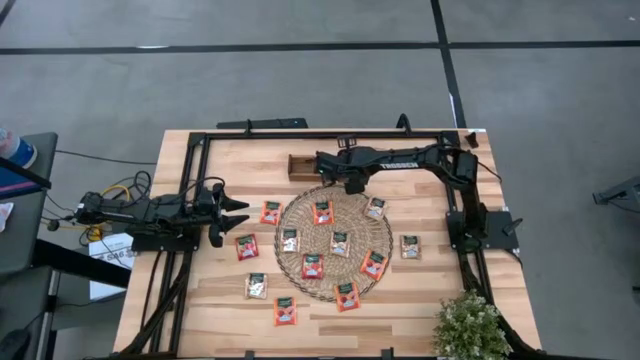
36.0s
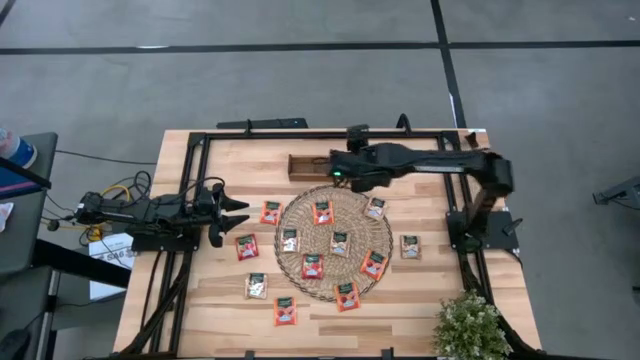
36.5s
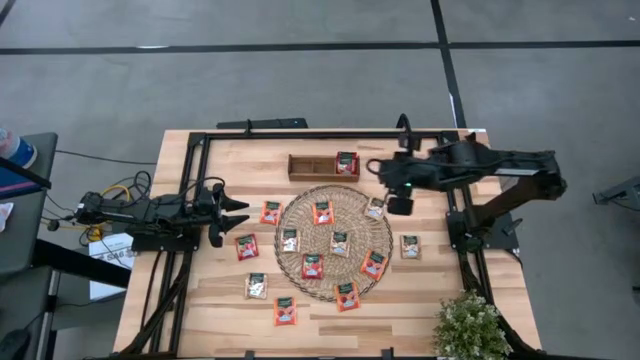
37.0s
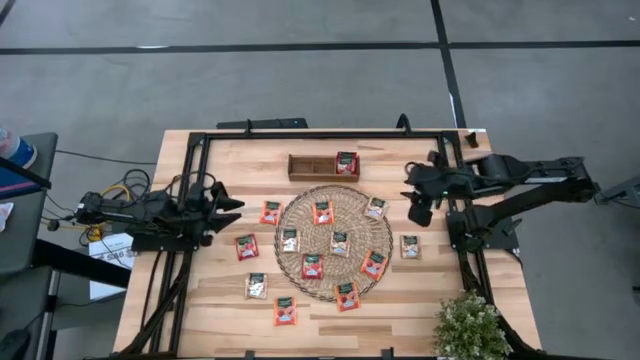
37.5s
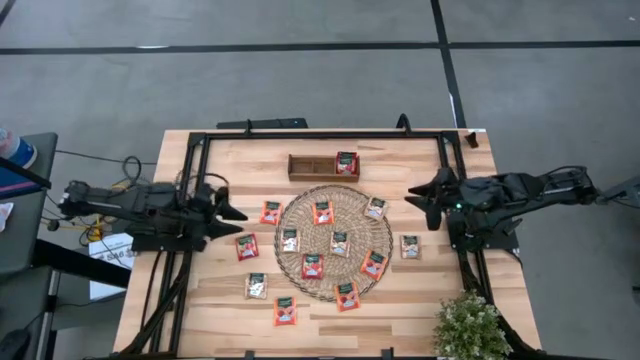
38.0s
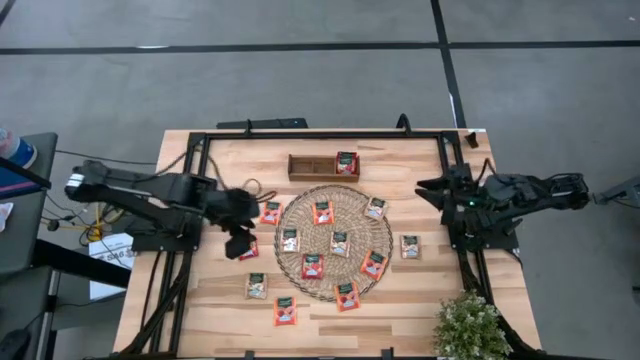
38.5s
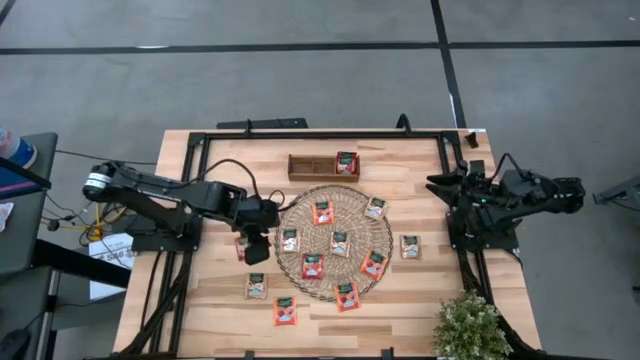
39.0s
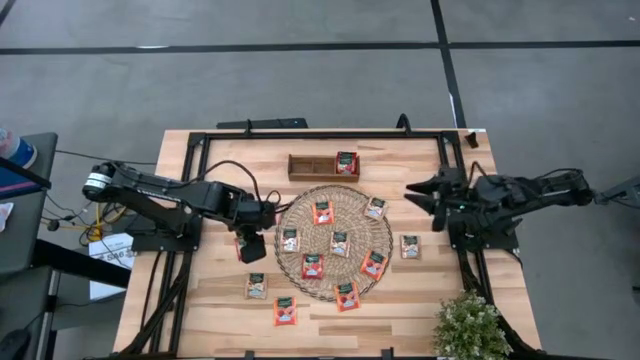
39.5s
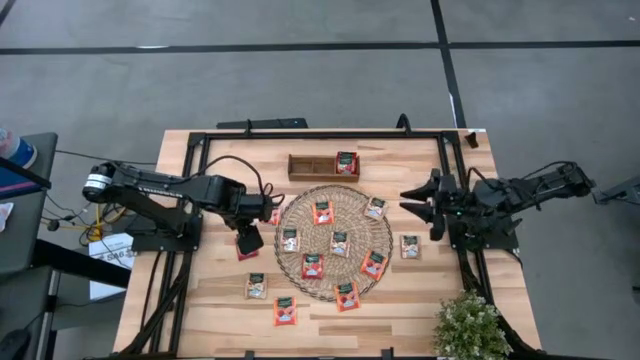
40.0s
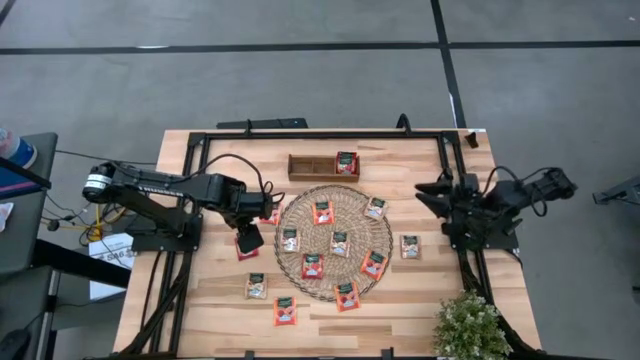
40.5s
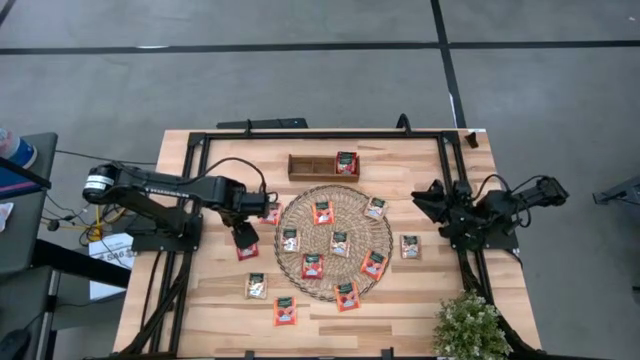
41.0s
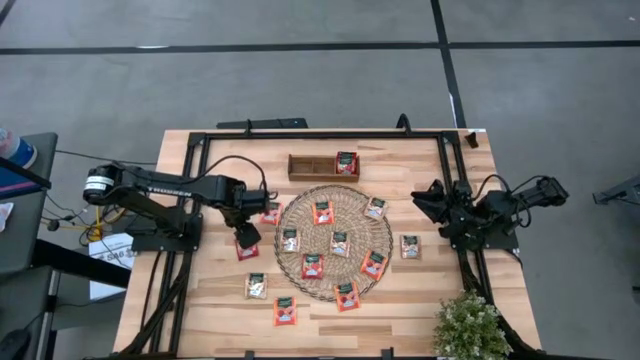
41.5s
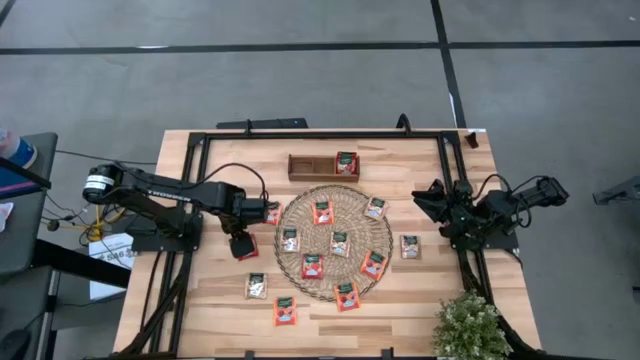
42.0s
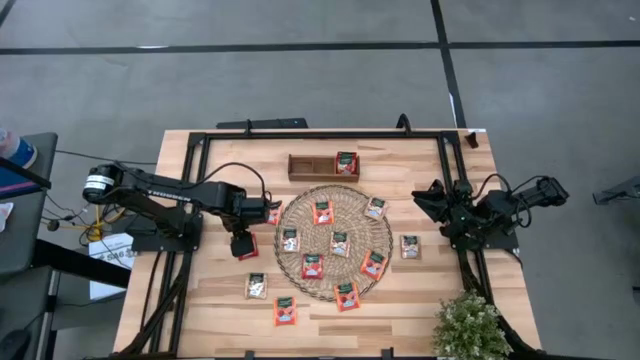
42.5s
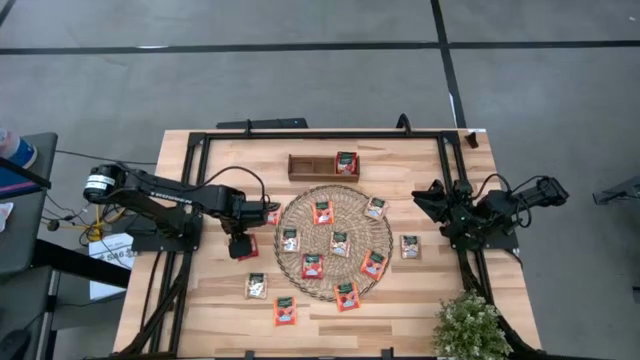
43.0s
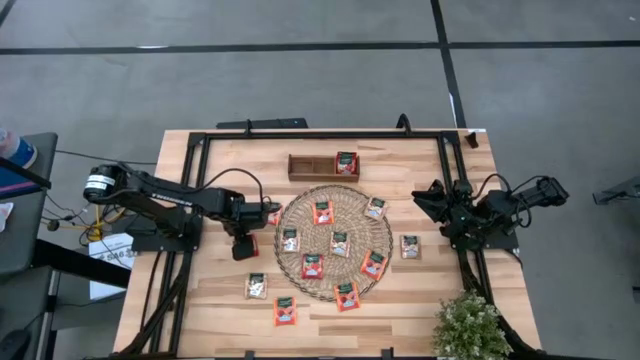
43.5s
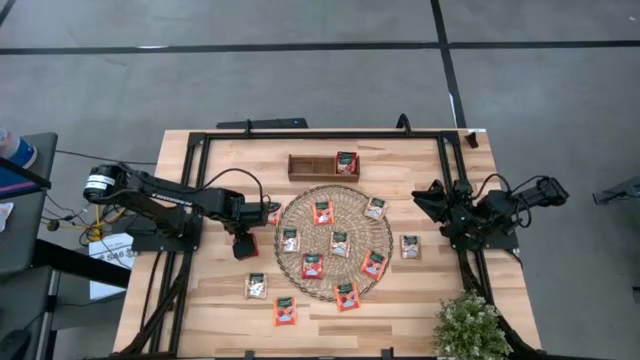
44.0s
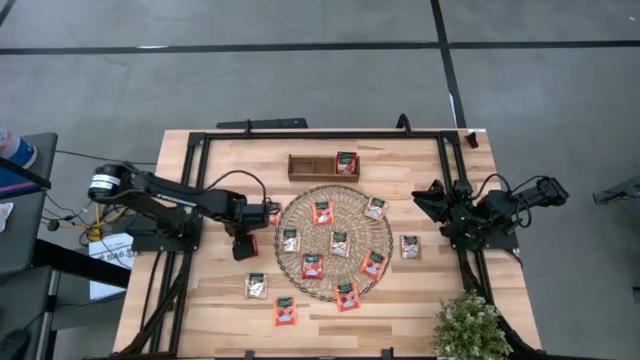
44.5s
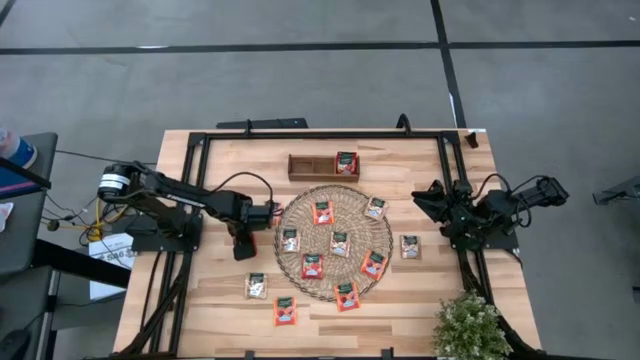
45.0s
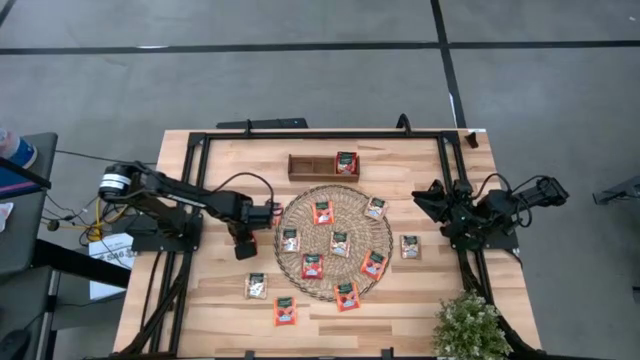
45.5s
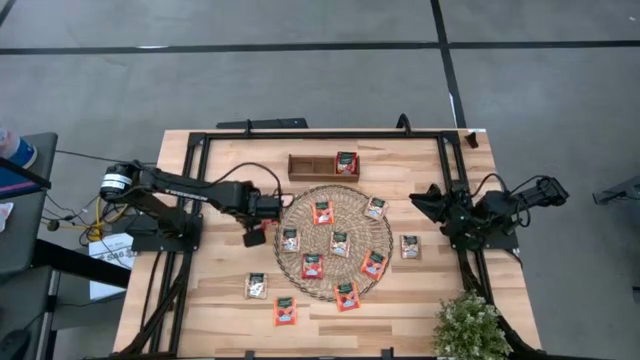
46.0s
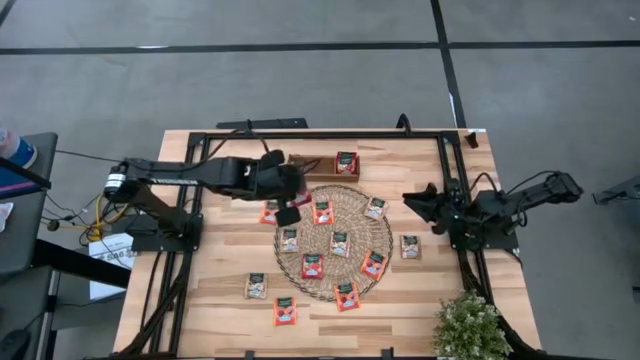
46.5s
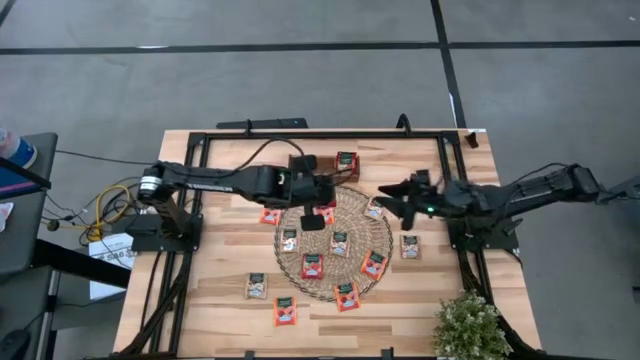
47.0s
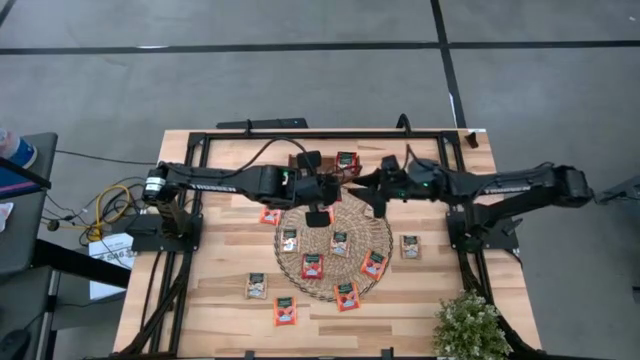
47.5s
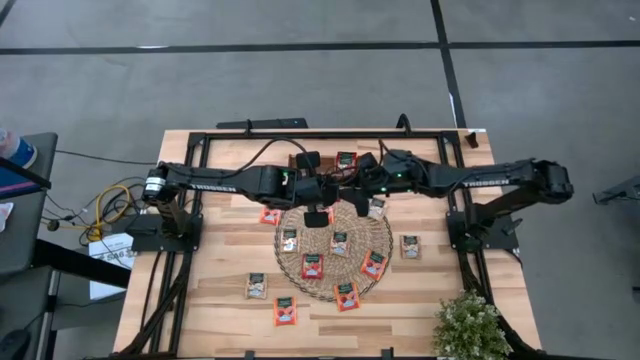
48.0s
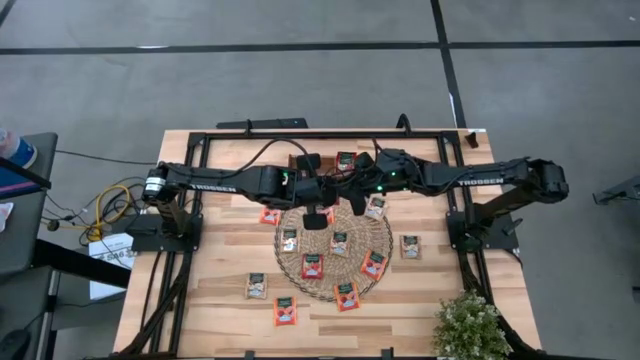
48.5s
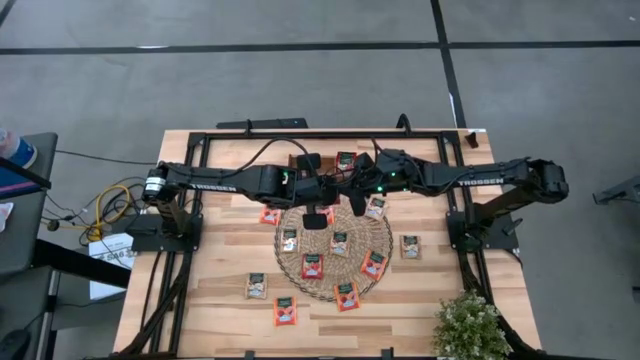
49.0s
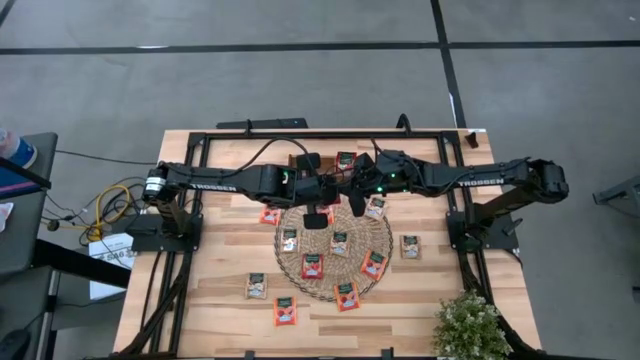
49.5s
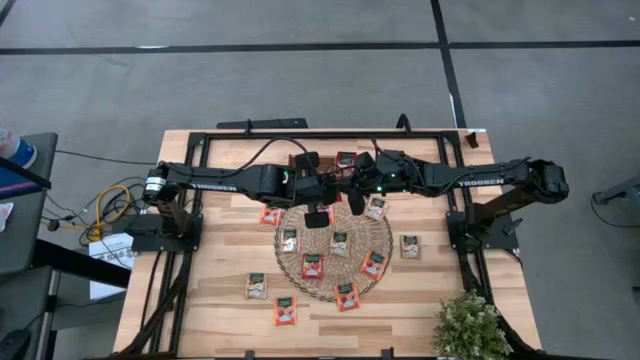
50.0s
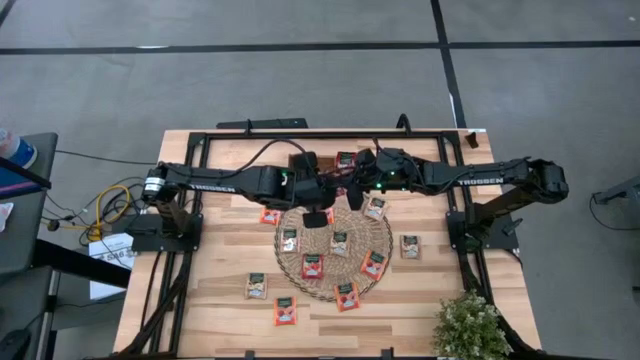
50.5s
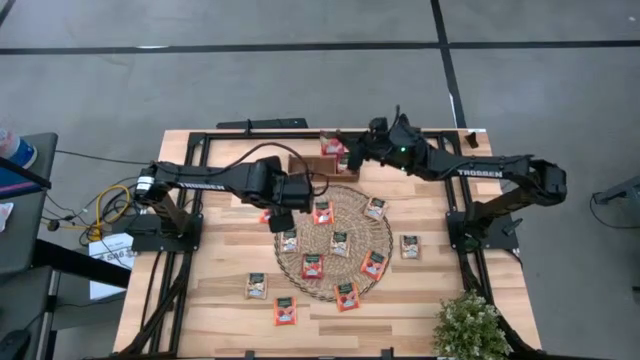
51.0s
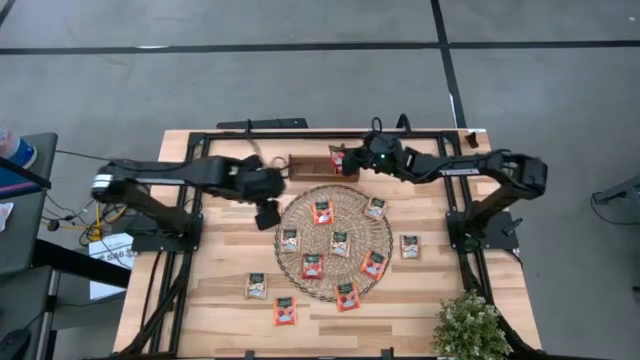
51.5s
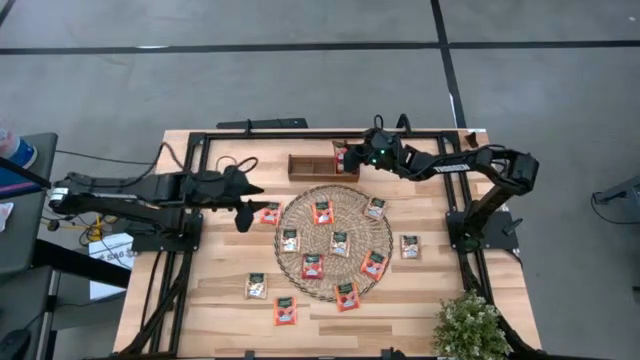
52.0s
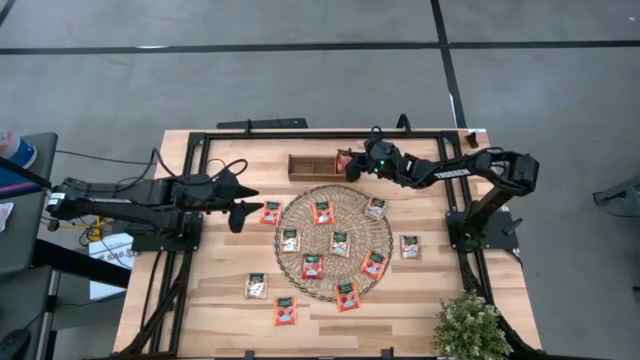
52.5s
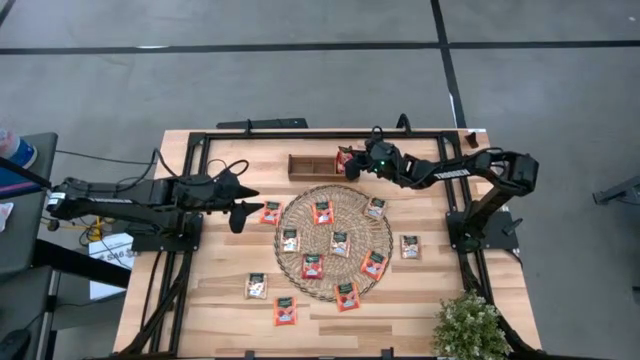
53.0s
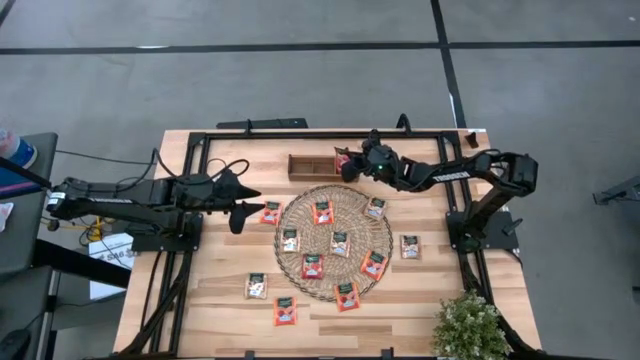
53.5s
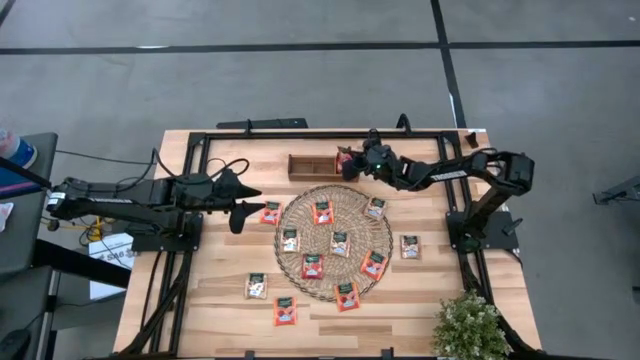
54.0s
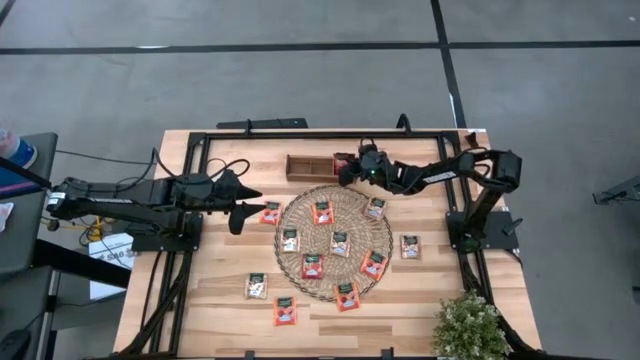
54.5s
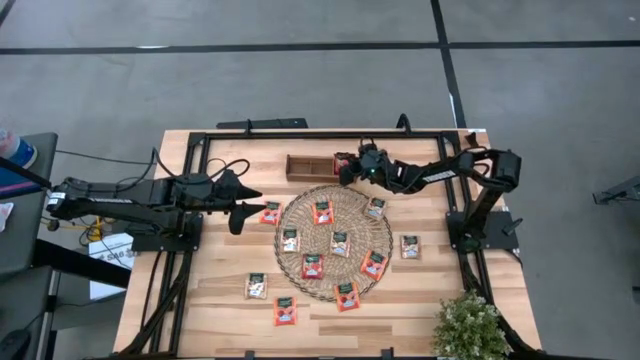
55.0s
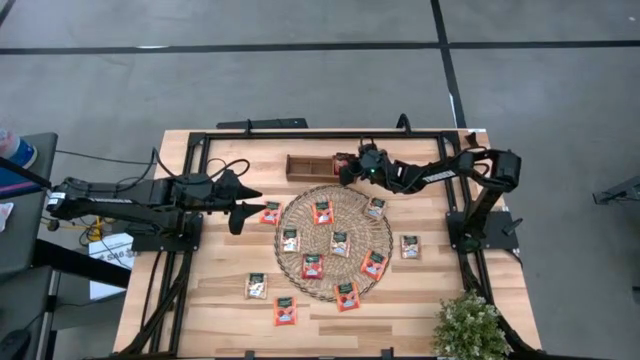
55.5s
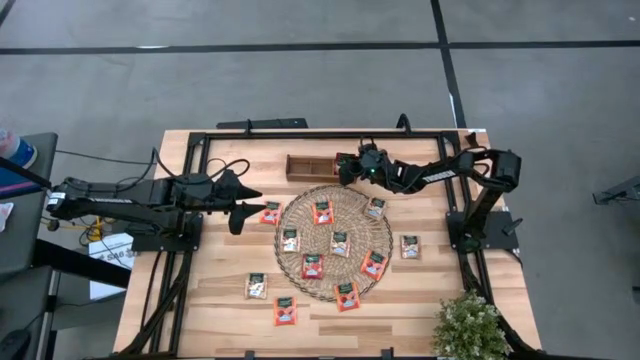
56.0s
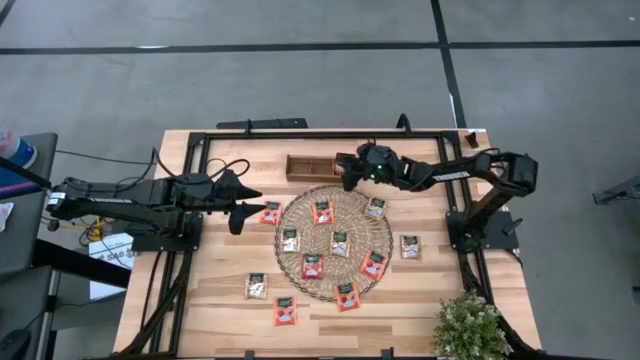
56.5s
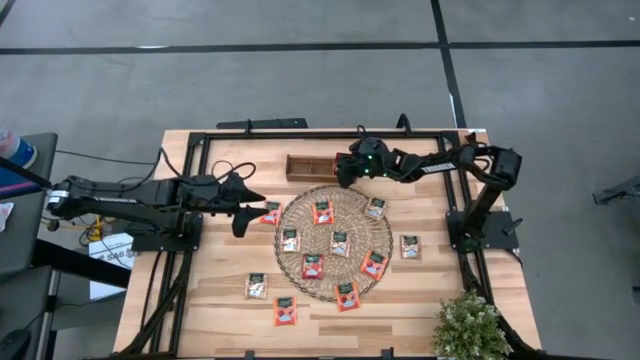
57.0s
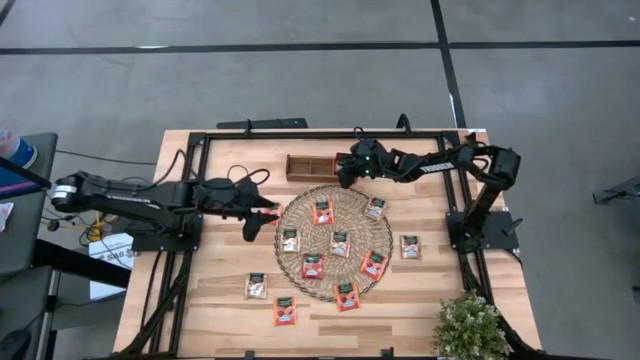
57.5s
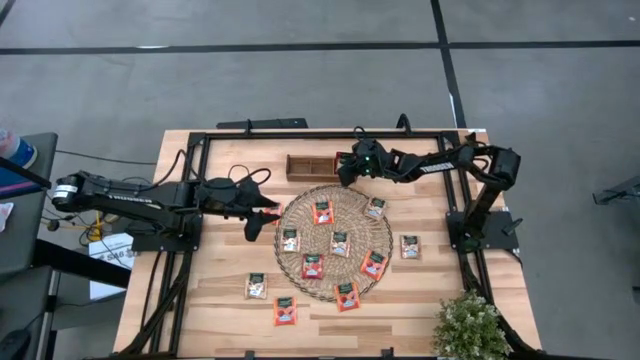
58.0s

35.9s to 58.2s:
Task: Pick & Place Tea
Put the red tea bag into the right section of the brown wooden organizer
